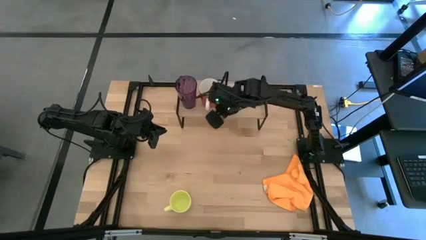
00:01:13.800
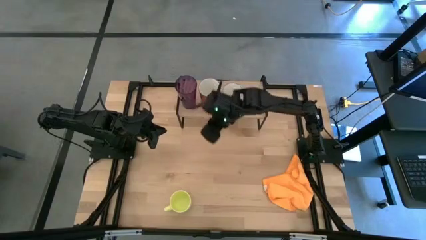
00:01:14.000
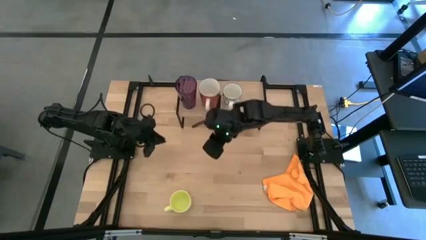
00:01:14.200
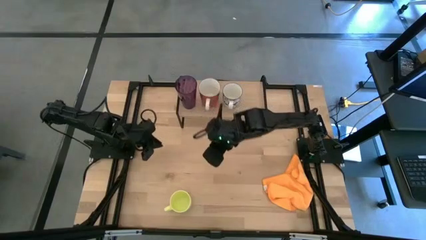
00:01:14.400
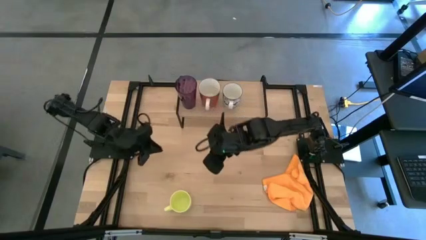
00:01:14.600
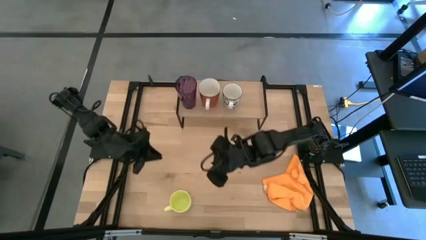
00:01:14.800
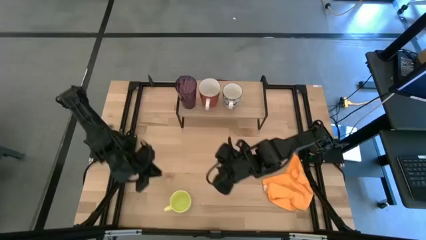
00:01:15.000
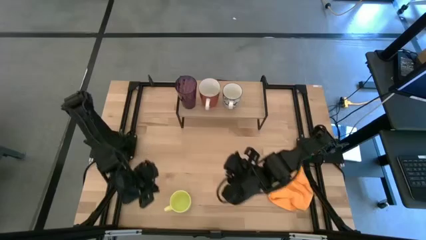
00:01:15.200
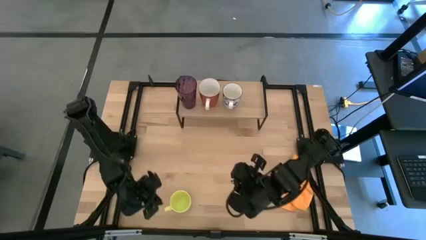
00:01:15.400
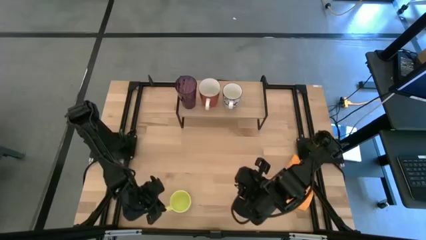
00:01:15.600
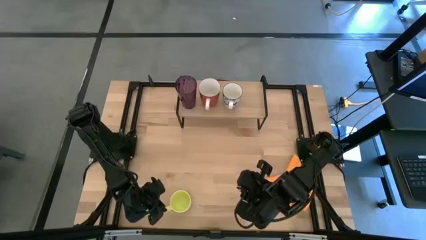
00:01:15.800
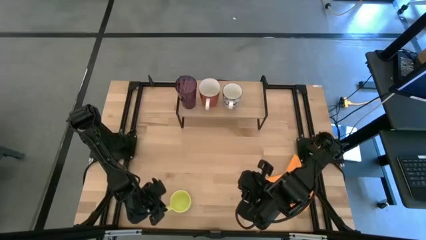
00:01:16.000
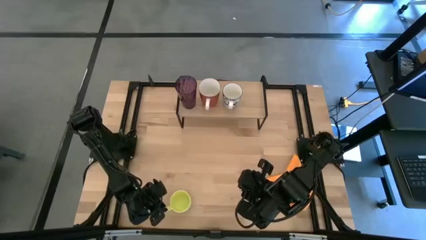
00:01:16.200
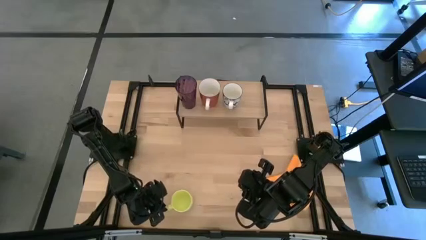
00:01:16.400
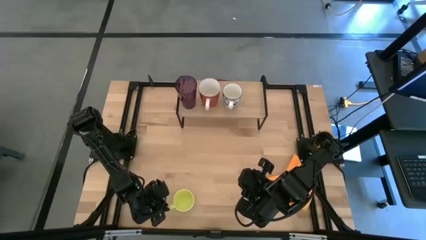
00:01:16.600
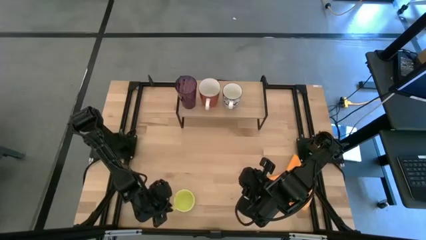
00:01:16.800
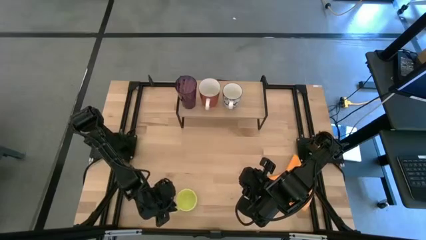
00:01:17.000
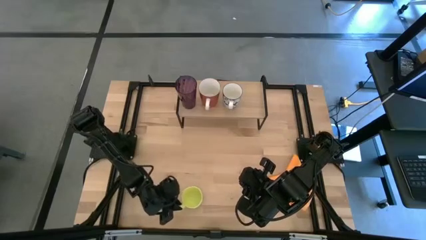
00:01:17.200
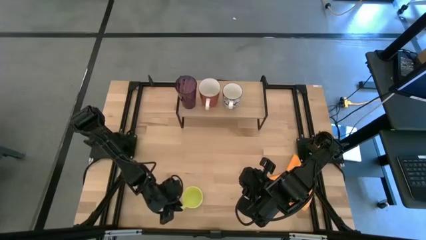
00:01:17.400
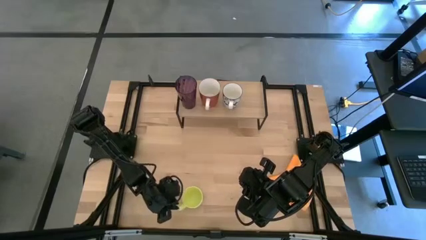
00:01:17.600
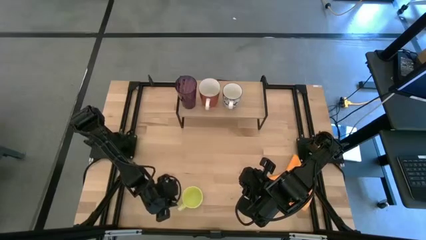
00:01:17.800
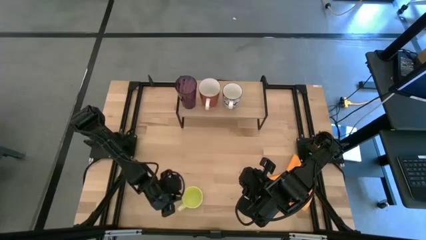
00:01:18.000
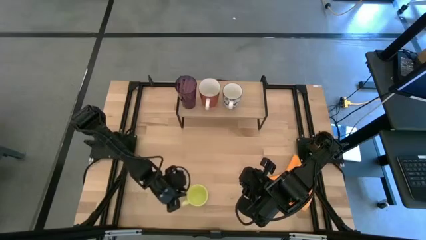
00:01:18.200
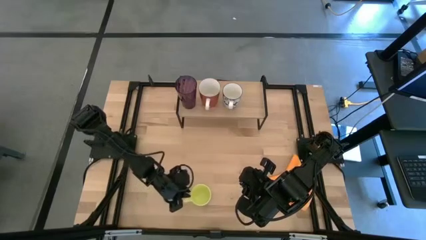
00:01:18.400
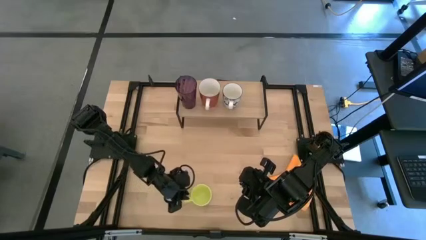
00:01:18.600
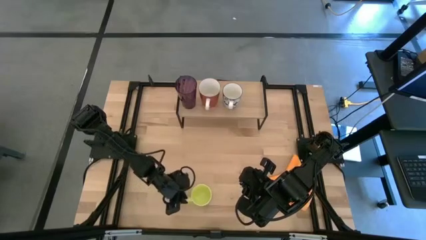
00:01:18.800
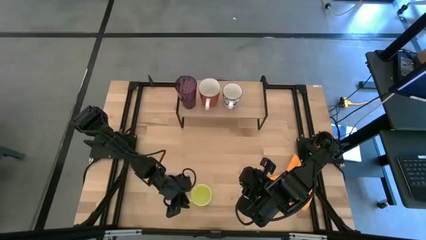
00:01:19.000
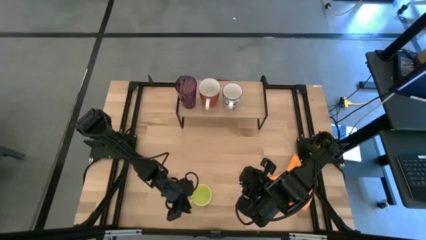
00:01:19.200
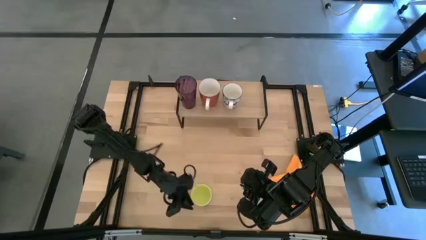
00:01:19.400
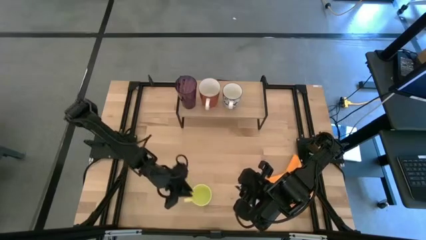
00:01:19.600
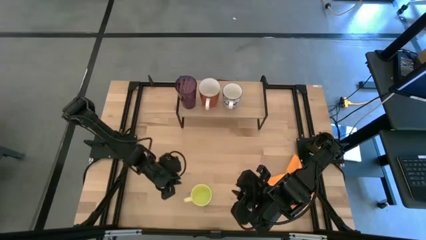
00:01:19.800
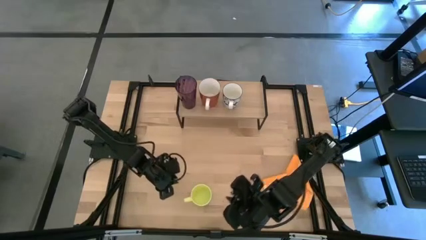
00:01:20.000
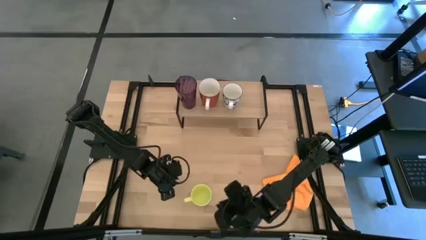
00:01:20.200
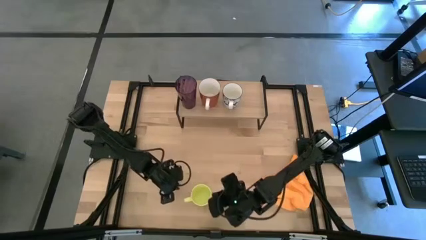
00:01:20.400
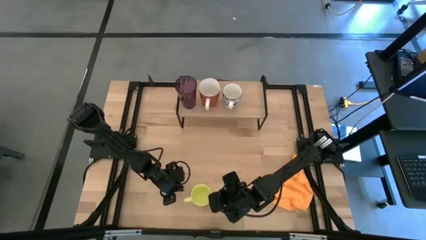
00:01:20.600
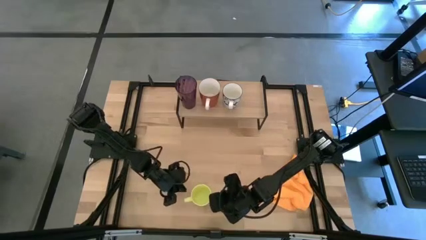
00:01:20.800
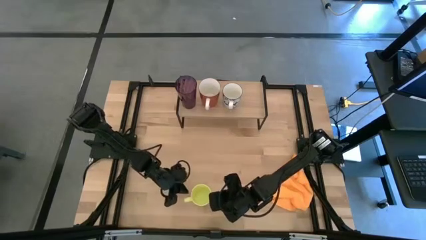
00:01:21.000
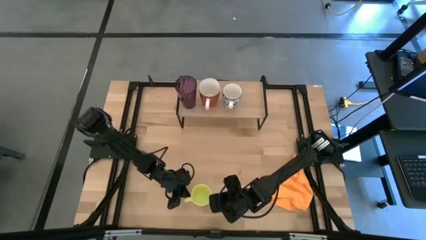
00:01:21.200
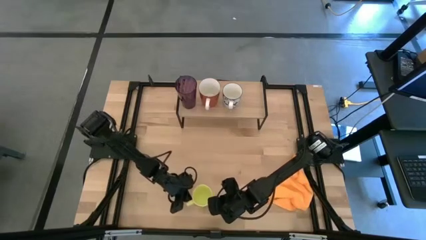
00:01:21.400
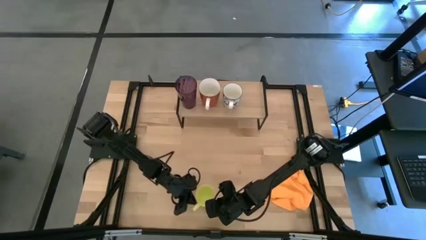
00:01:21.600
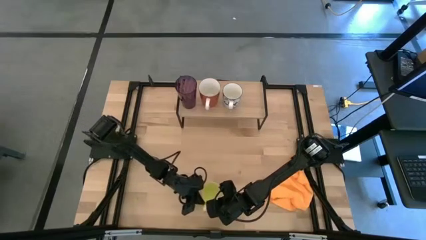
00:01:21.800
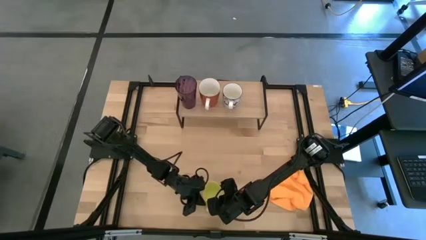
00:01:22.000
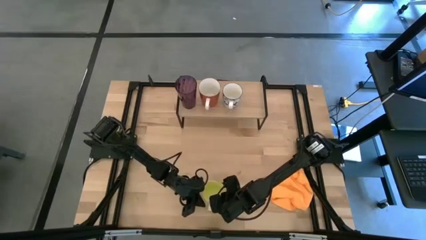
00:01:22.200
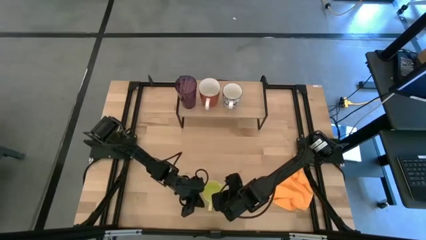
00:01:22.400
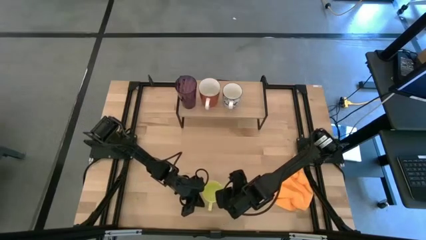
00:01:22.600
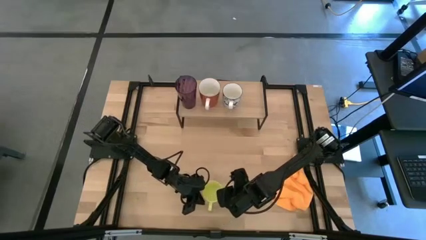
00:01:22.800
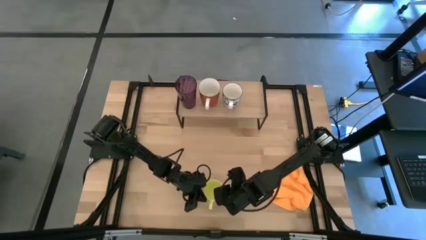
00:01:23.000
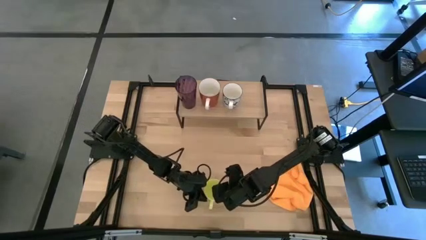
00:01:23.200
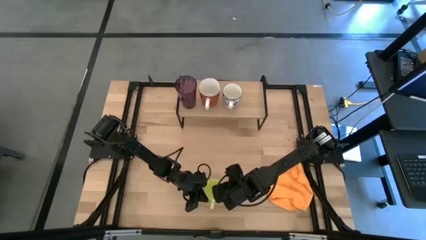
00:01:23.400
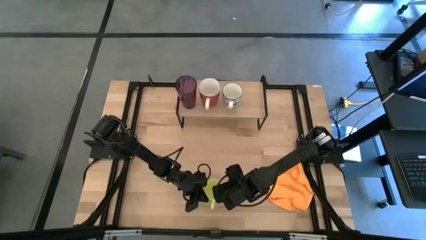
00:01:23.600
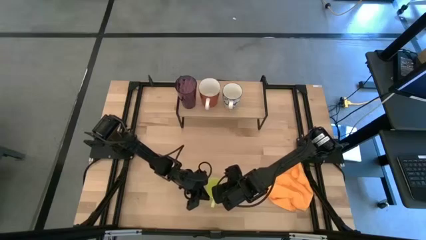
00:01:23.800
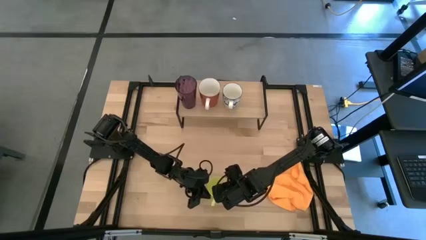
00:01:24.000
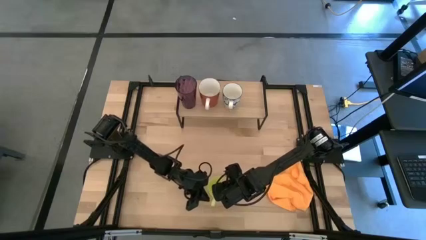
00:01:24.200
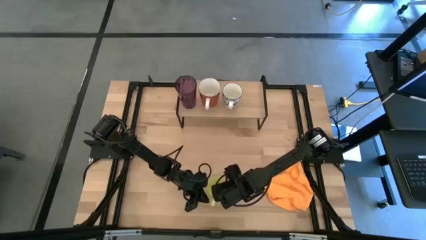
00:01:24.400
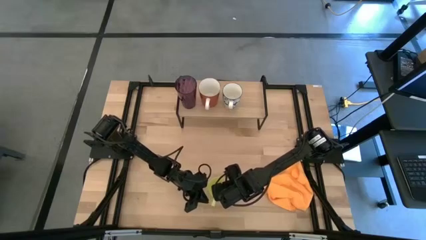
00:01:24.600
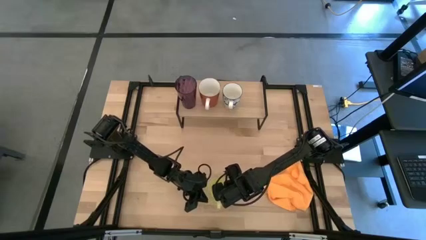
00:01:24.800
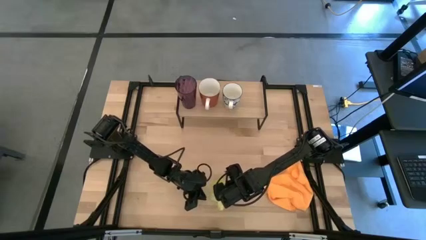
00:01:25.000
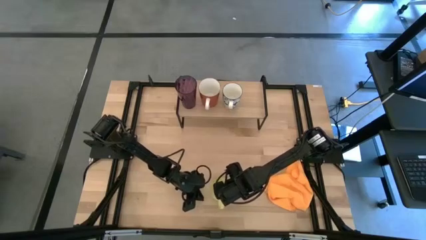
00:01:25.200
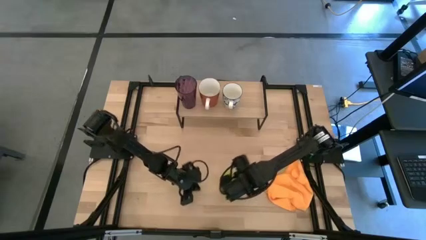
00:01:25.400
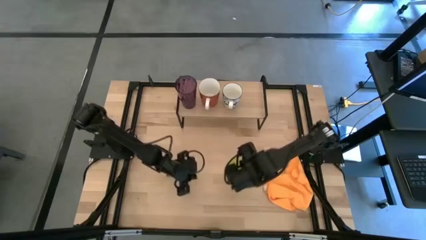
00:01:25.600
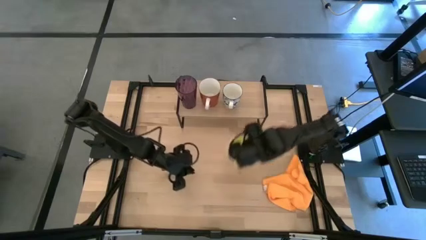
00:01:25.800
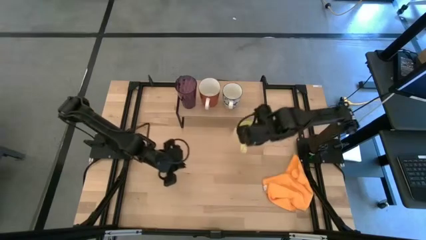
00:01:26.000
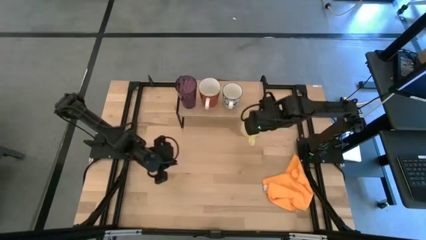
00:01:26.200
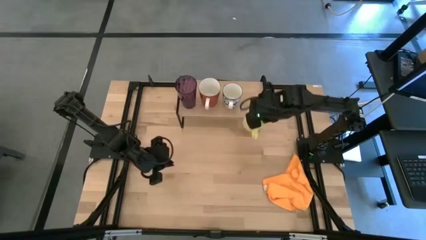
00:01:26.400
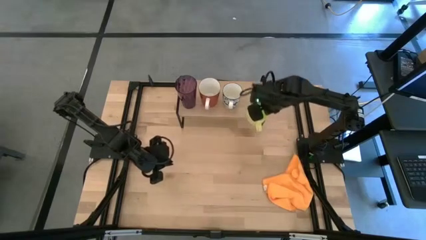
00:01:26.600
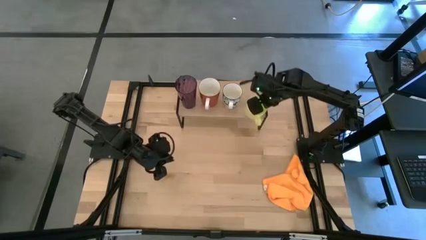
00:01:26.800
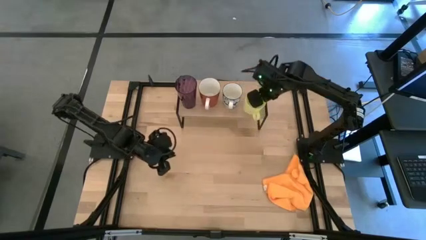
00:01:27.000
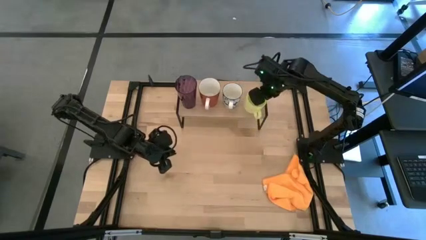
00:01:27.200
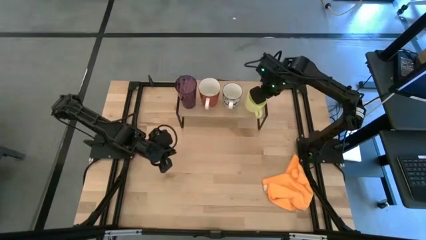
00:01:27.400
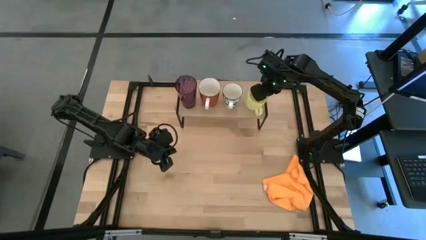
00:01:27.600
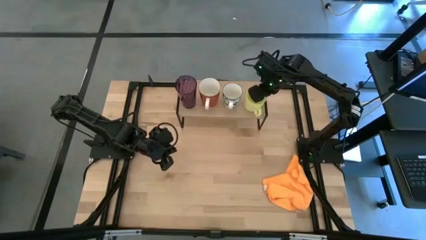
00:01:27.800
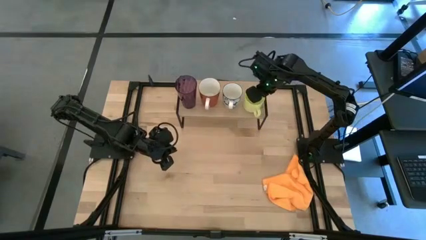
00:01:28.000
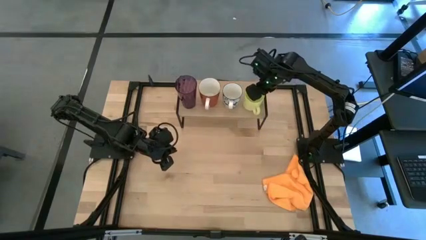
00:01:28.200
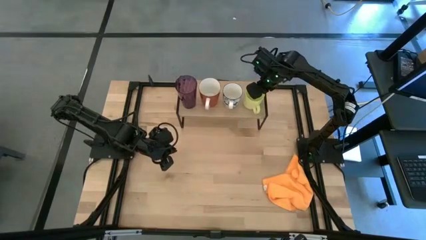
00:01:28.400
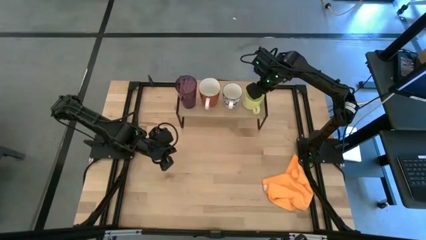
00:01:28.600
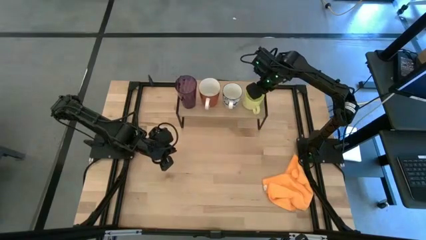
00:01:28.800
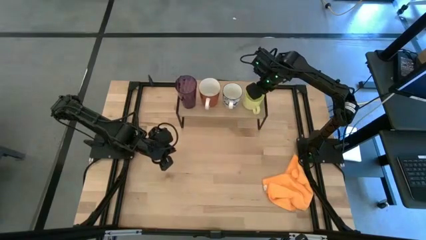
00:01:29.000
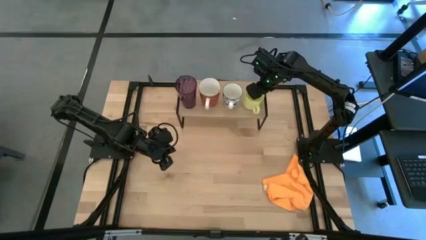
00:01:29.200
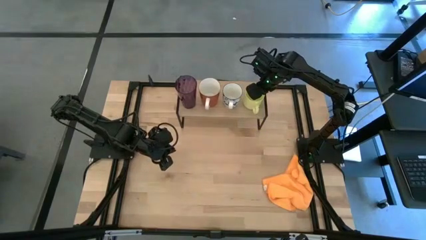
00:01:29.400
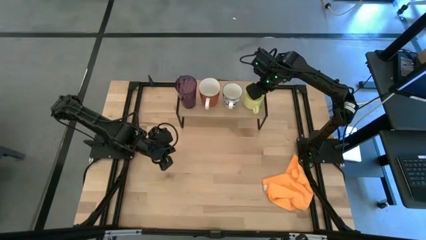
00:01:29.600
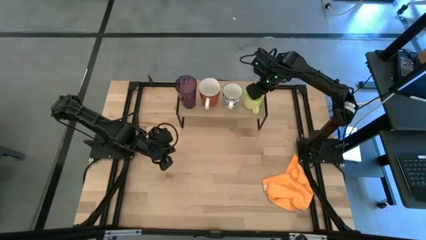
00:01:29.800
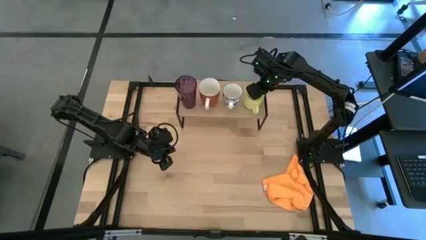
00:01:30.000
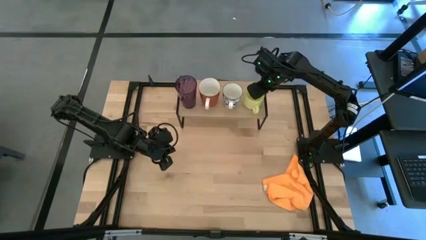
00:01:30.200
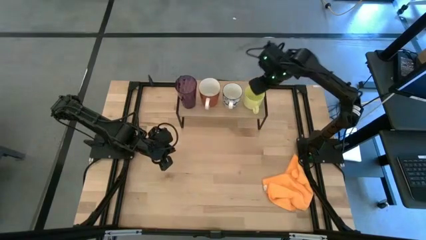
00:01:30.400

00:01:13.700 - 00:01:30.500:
Task: Stack small to large cups/mugs on shelf
Put the yellow mug on the shelf
